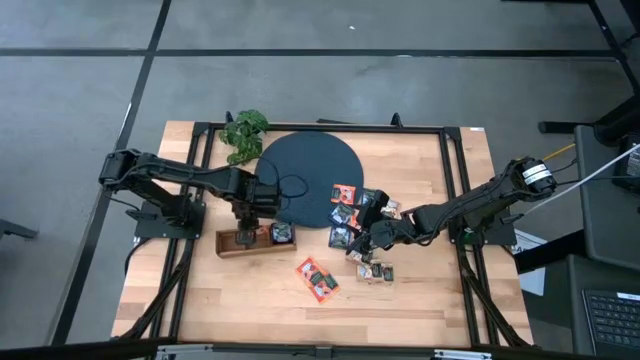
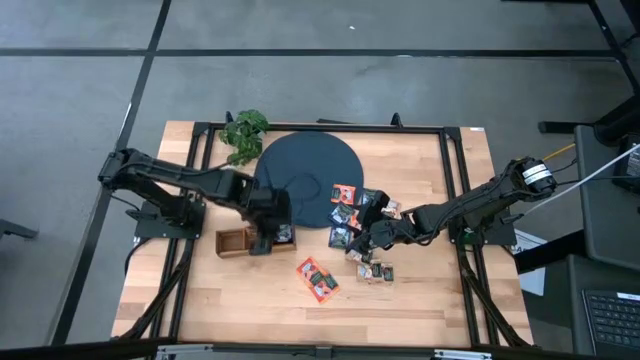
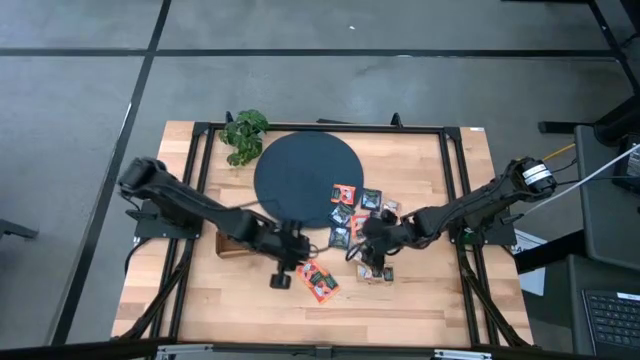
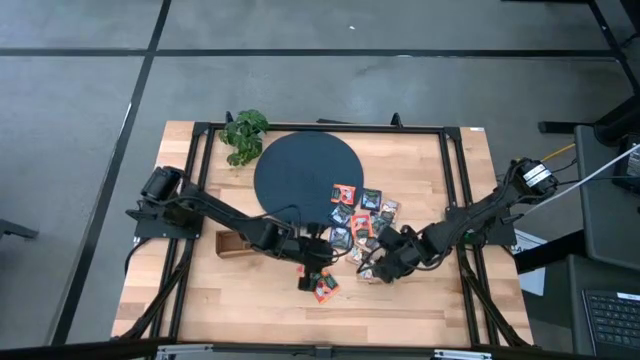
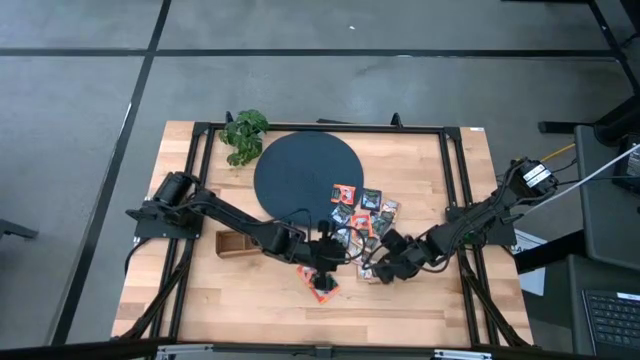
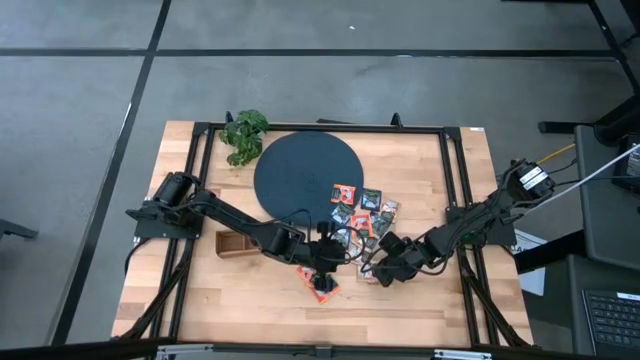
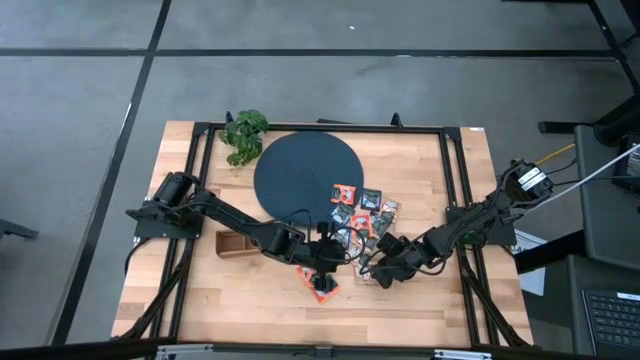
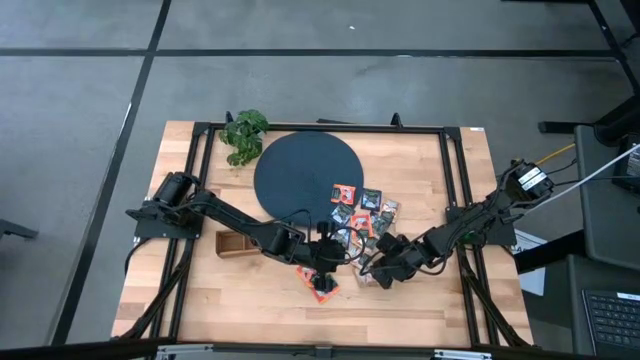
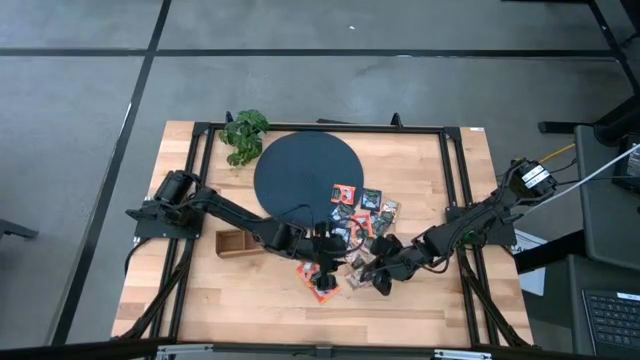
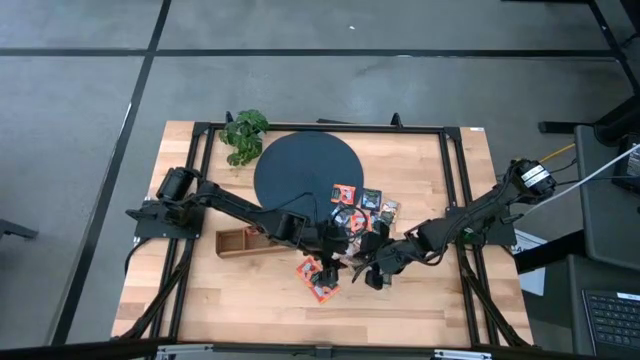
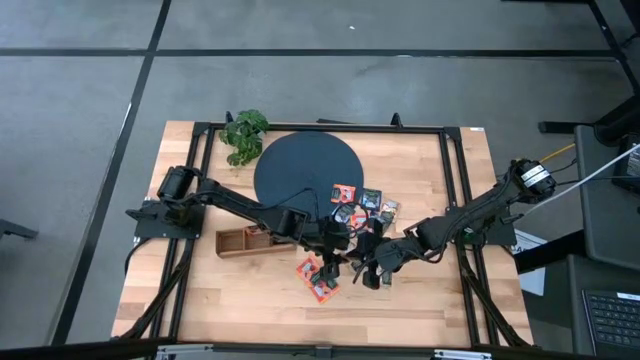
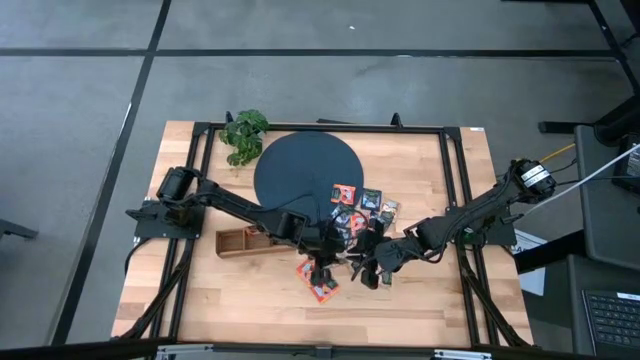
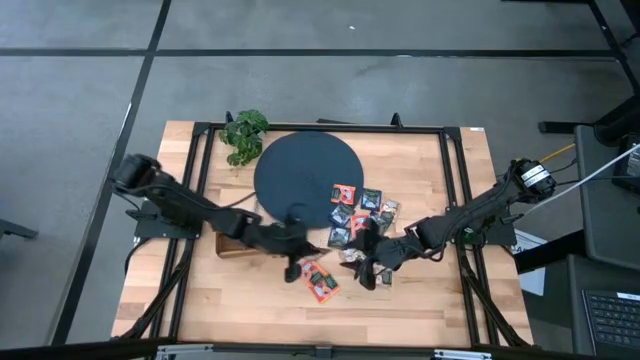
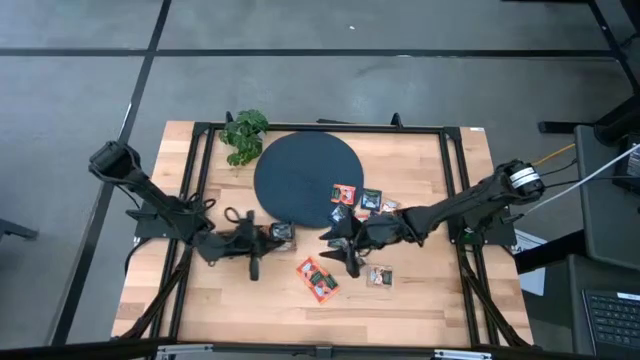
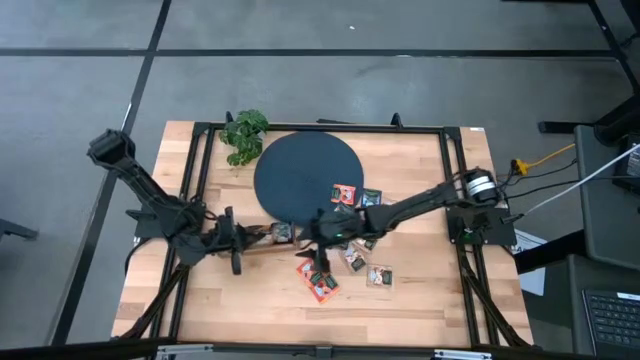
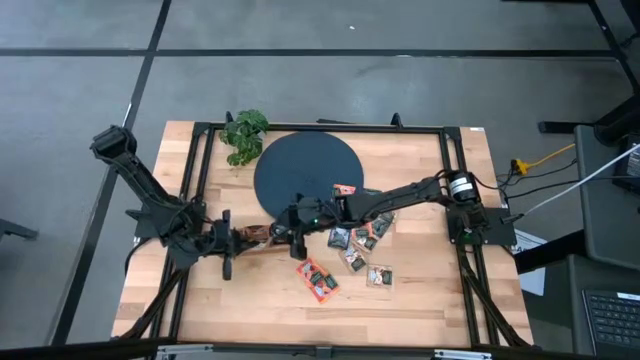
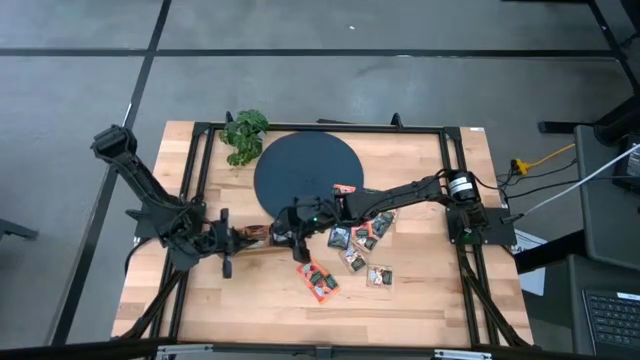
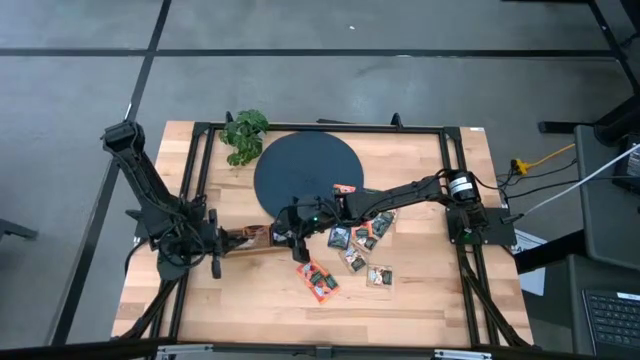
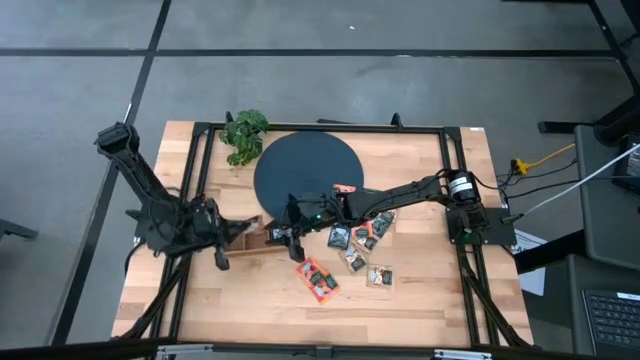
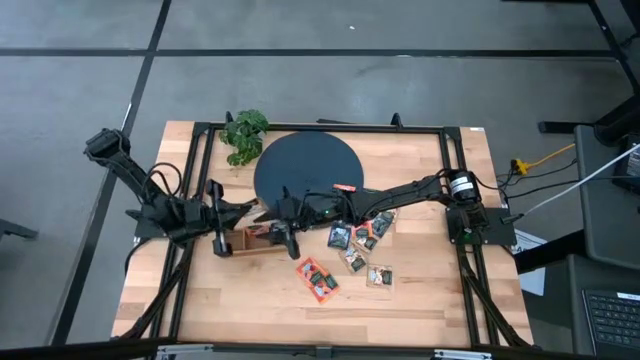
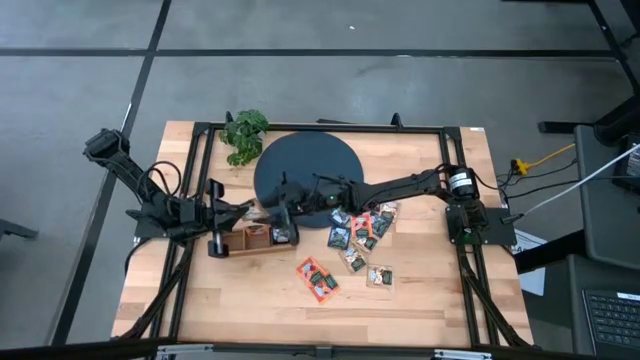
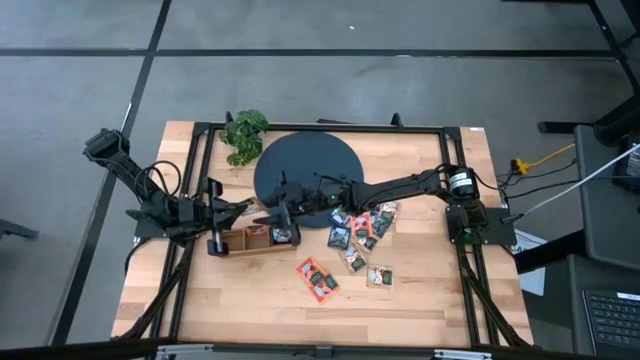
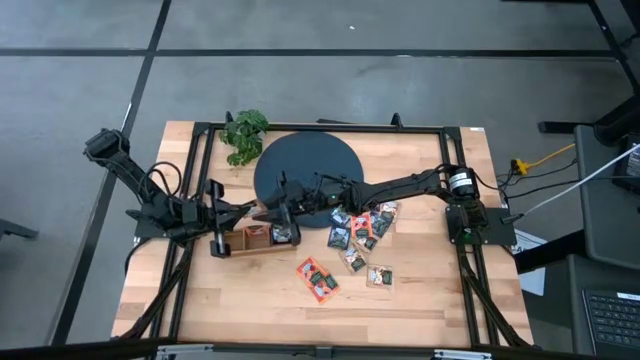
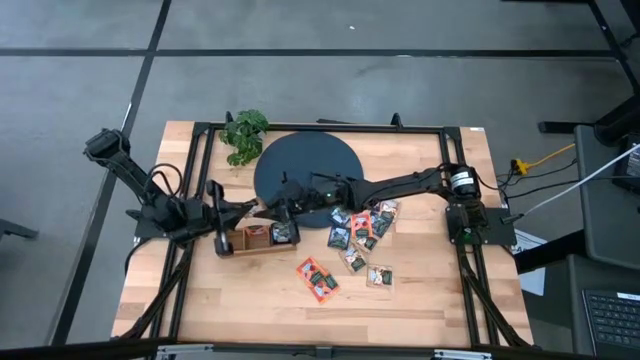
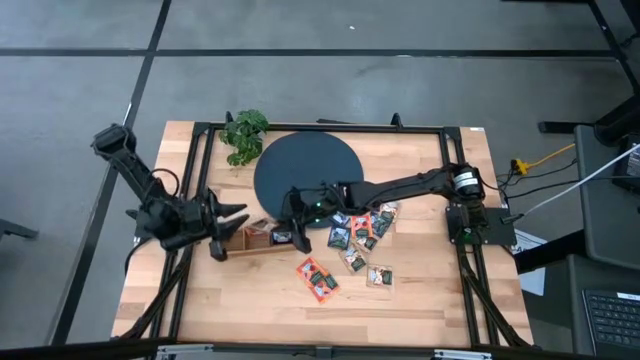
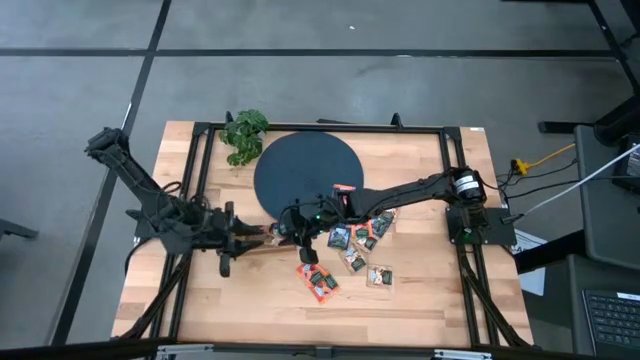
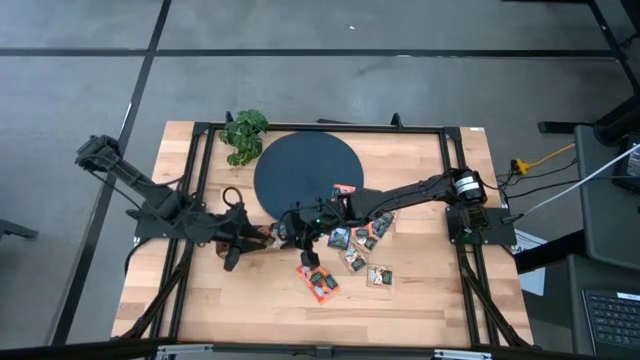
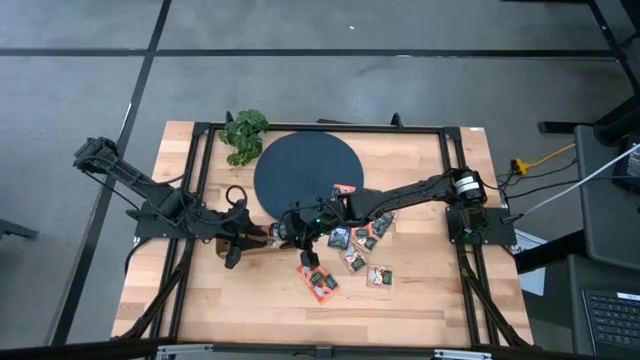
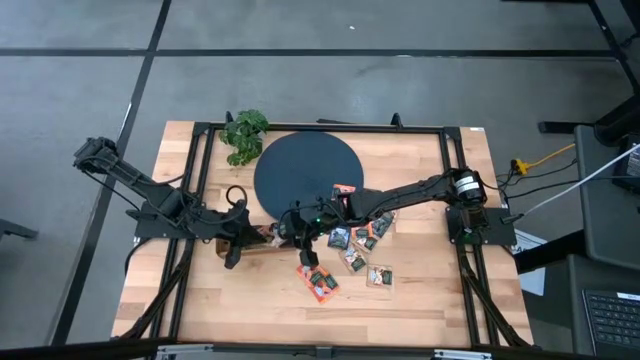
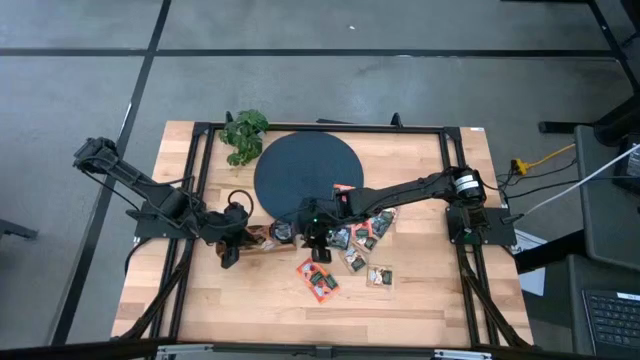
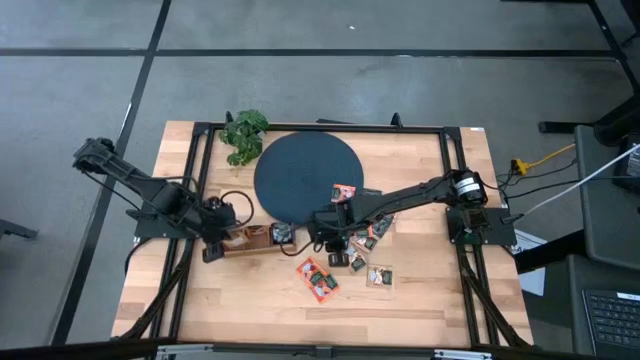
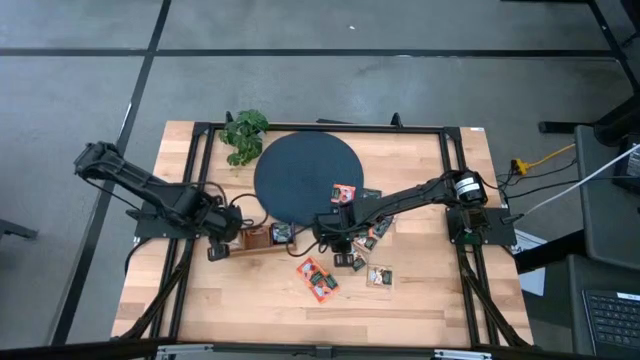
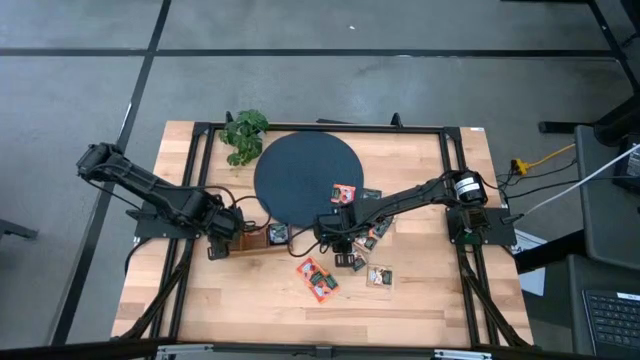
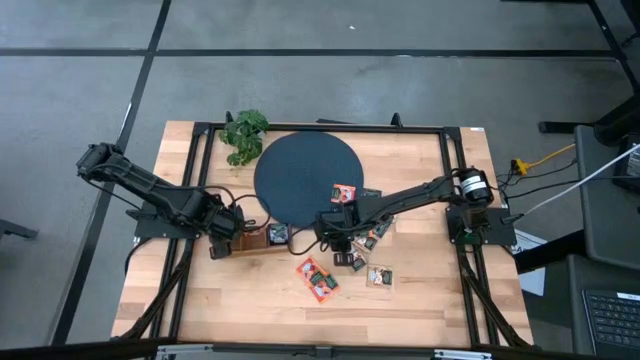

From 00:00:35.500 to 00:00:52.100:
Task: Pick & Place Tea
Put the brown tea bag into the left section of the wooden organizer
